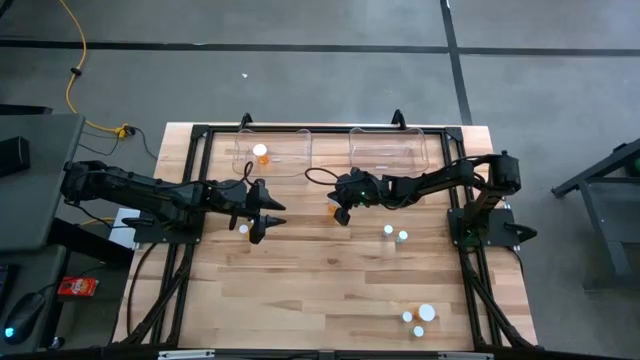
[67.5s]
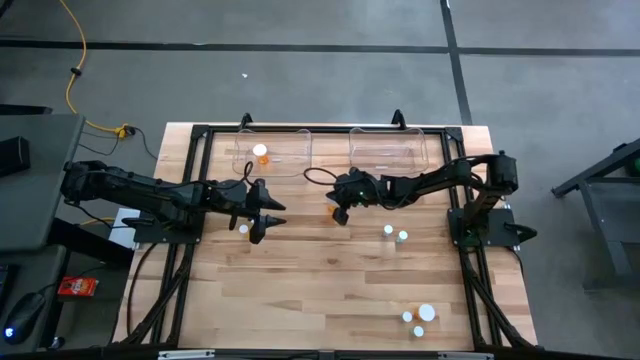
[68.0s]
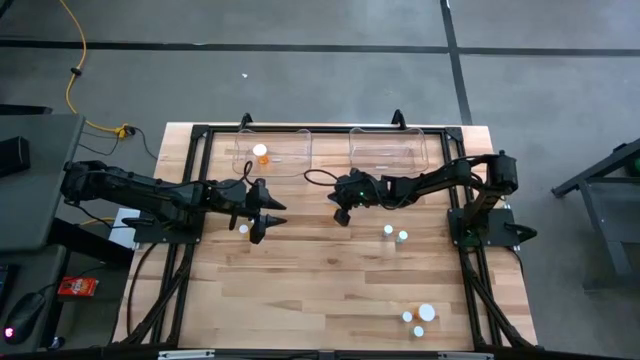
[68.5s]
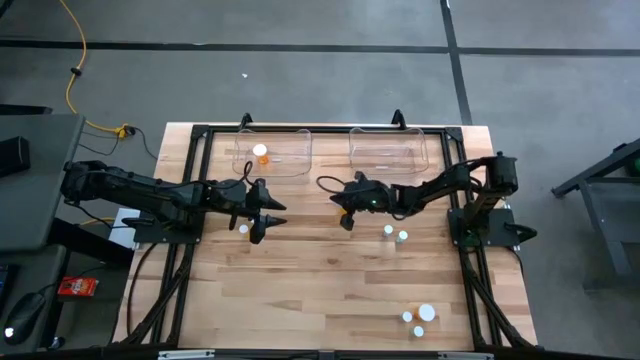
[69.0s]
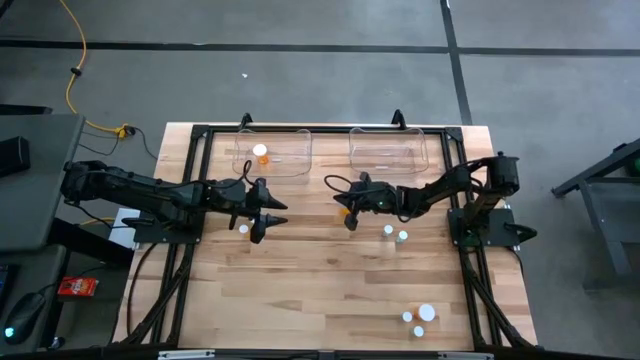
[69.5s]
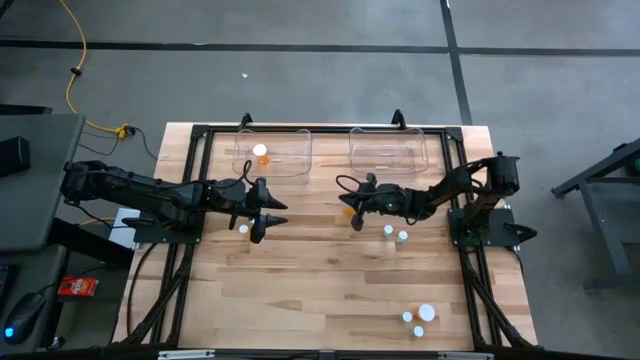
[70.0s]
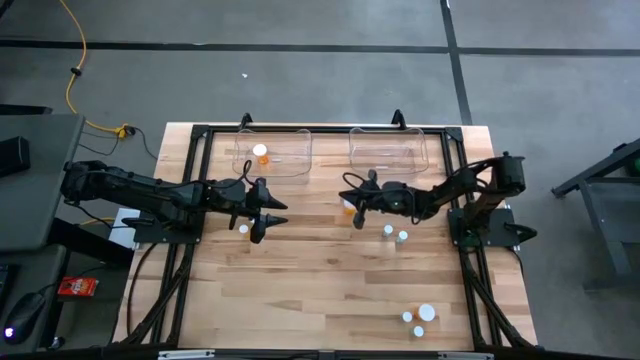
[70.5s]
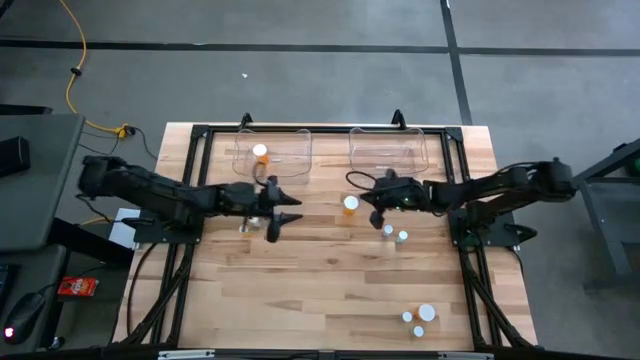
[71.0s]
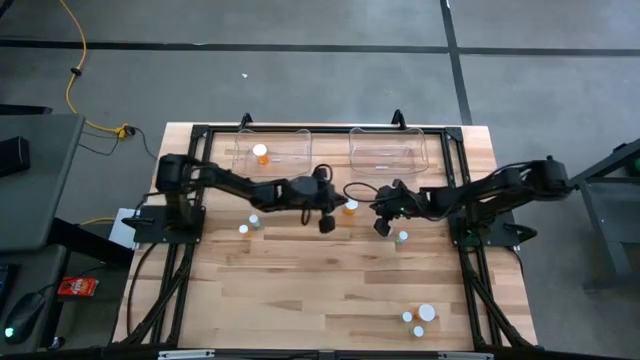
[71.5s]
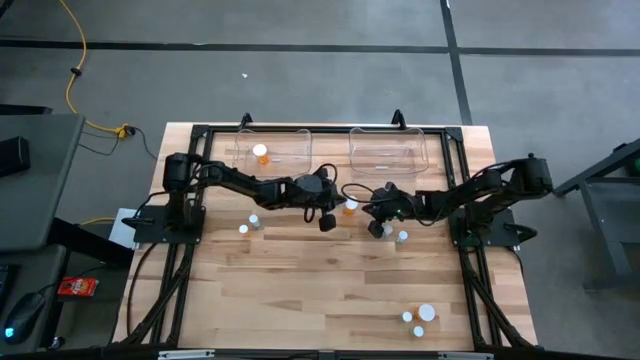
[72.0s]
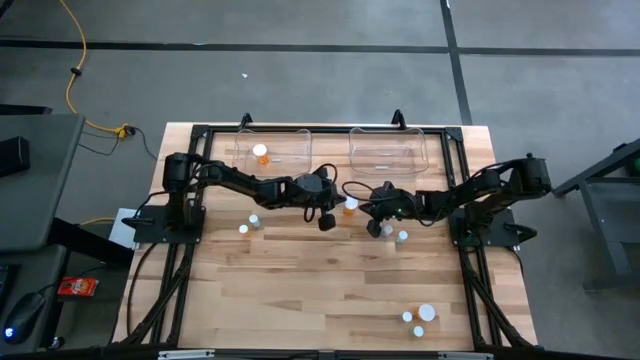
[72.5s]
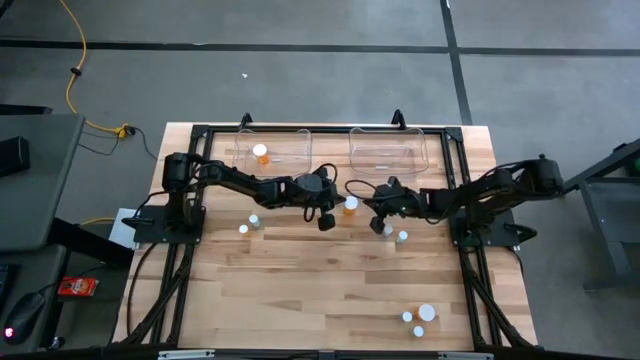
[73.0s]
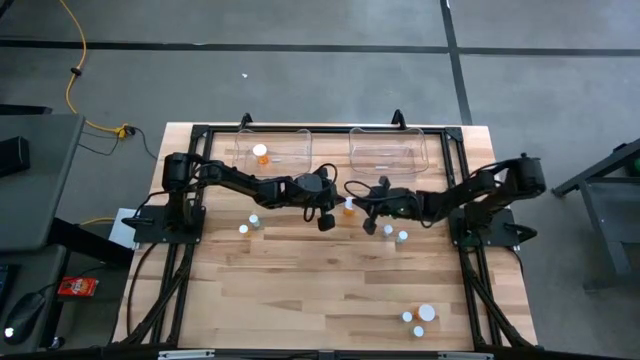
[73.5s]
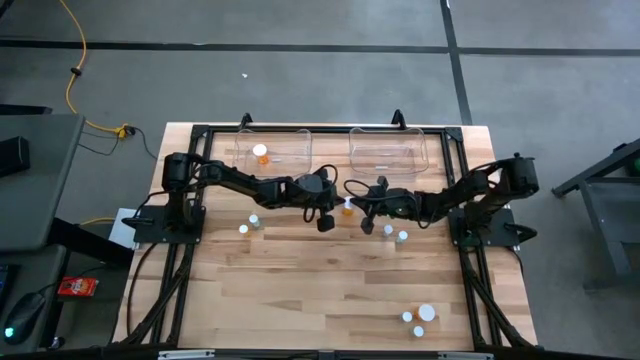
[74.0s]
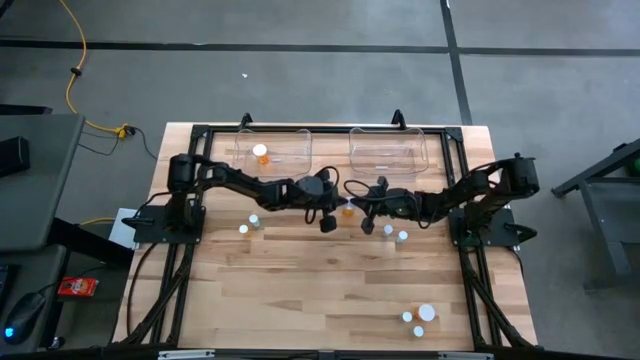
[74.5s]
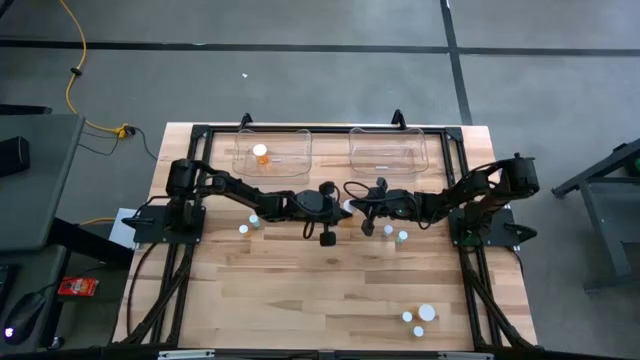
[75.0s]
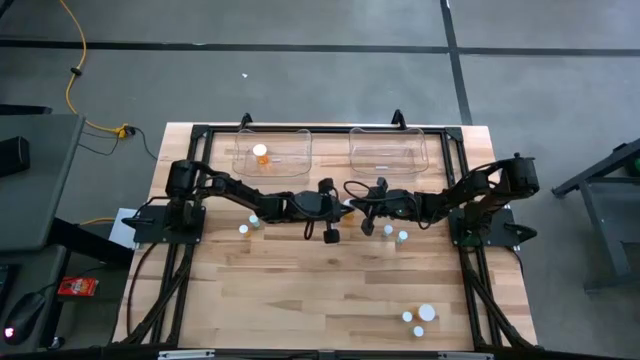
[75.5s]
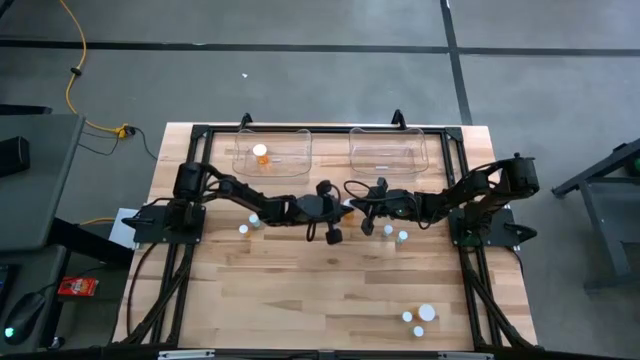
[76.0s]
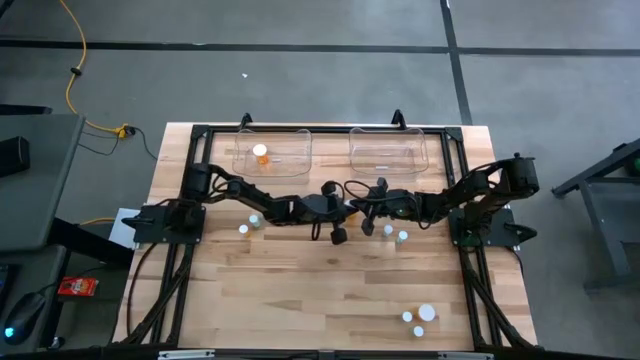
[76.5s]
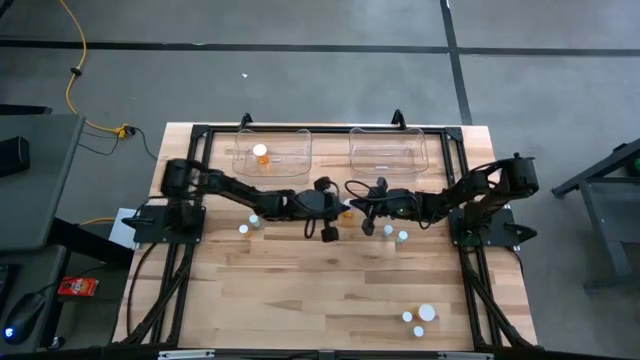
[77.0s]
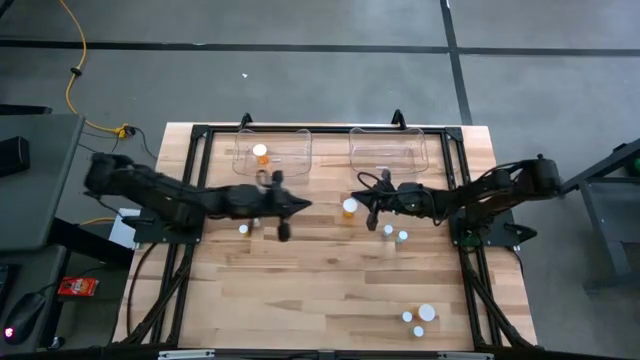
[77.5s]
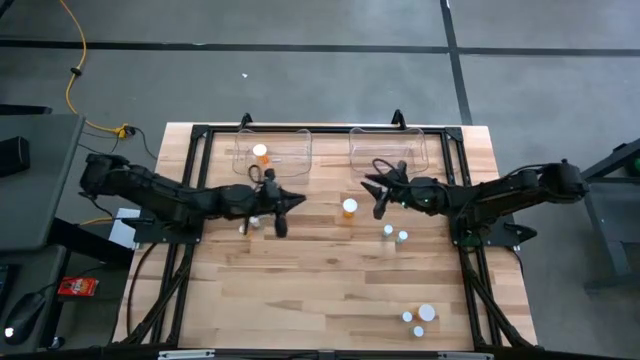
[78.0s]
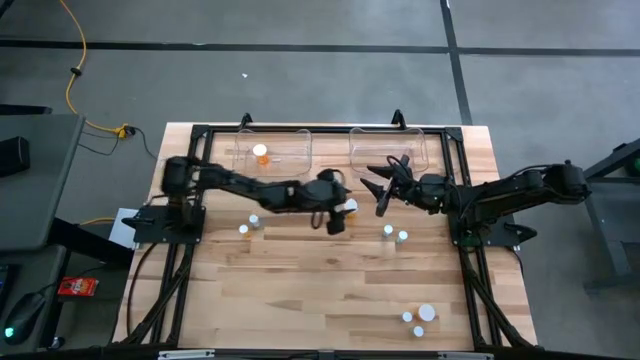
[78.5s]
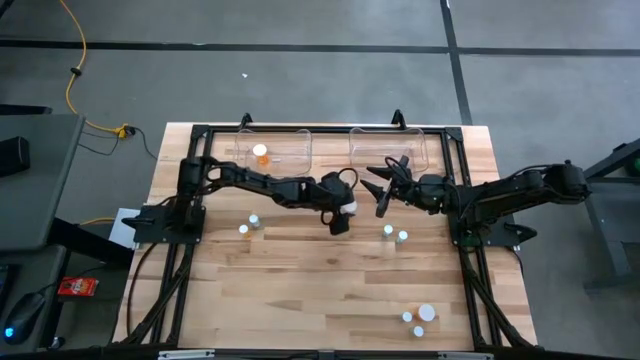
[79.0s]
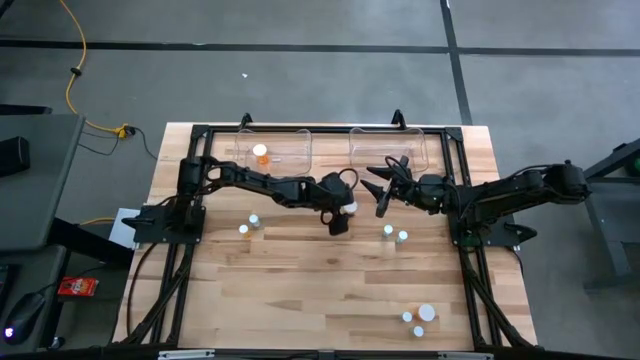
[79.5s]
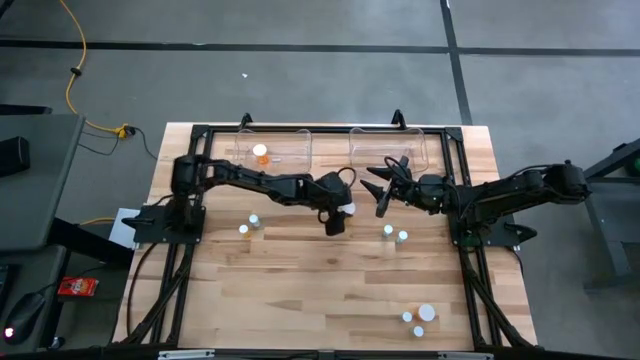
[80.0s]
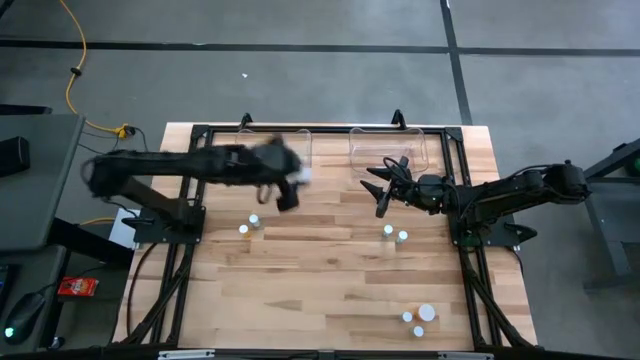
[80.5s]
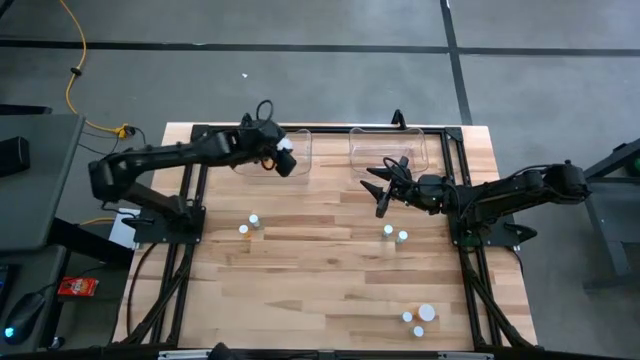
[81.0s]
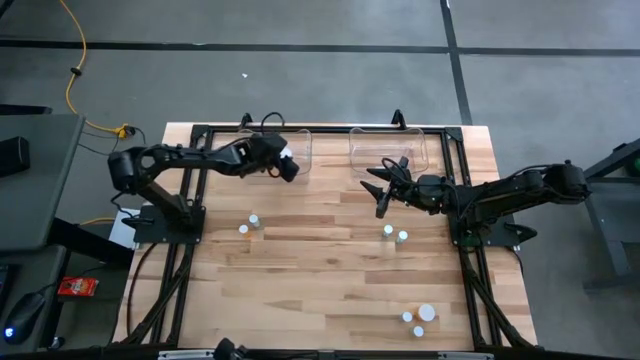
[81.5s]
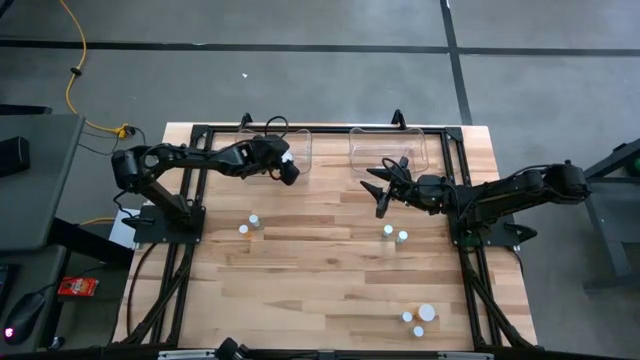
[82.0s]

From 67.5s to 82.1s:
Task: Pick and place medicine bottles into bin by pill shape (circle, oval)
Put the top orange capsule bottle into the left transparent bin

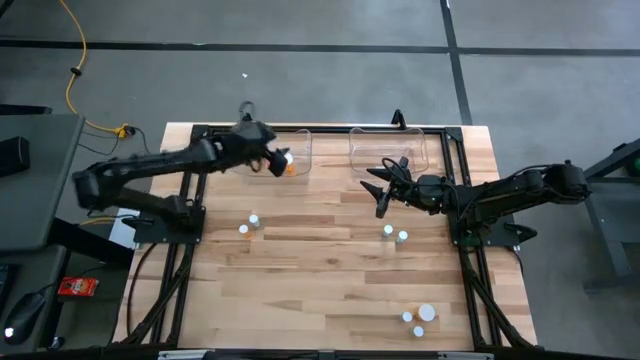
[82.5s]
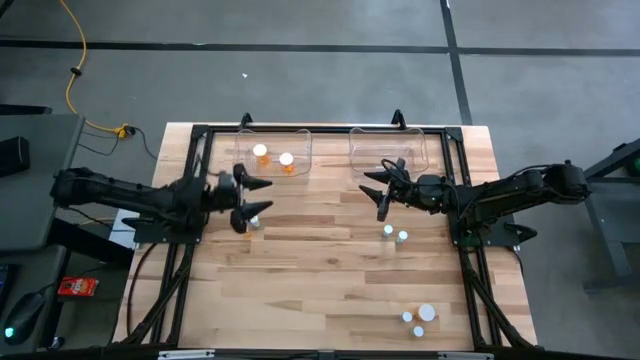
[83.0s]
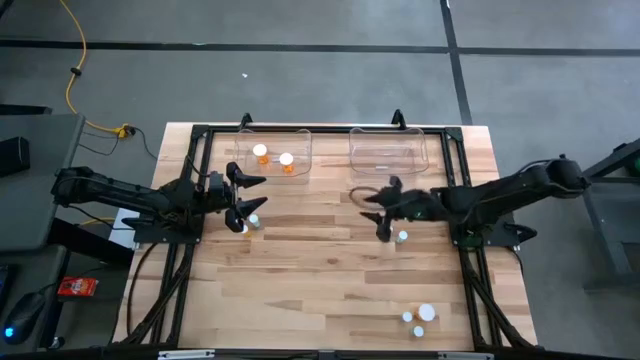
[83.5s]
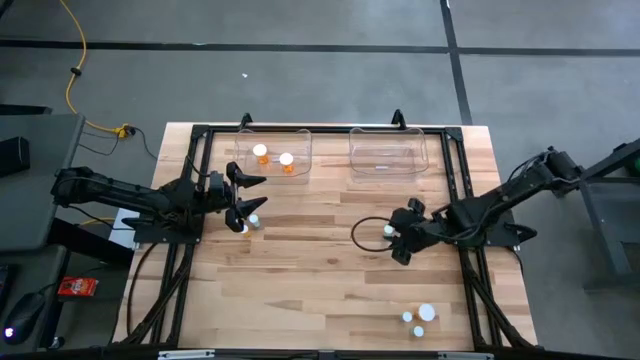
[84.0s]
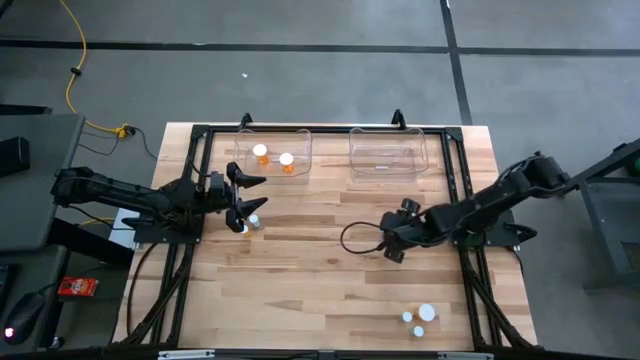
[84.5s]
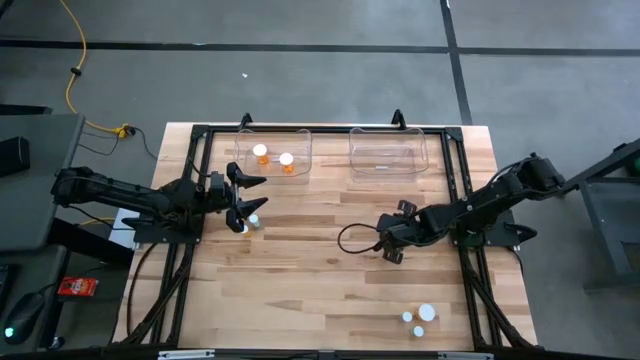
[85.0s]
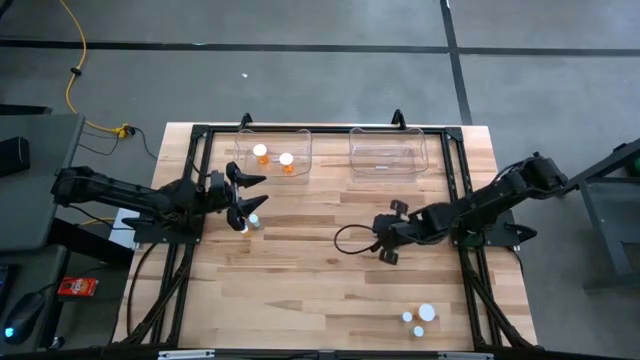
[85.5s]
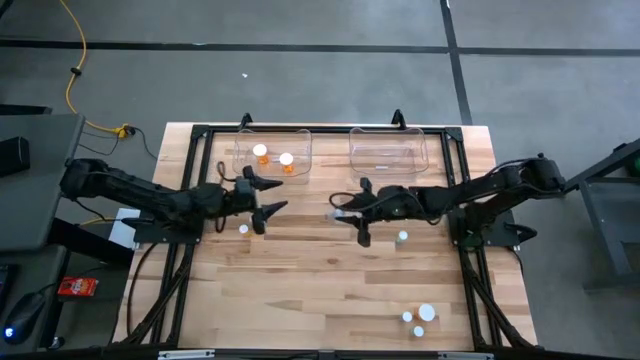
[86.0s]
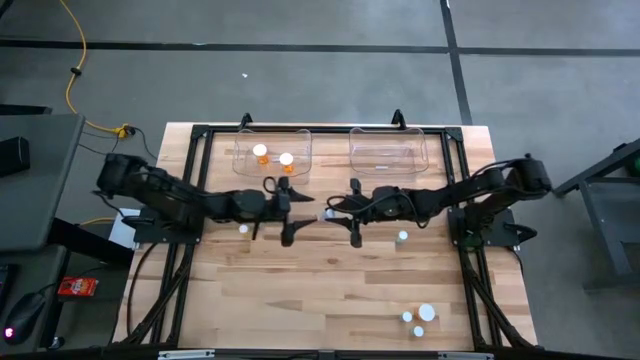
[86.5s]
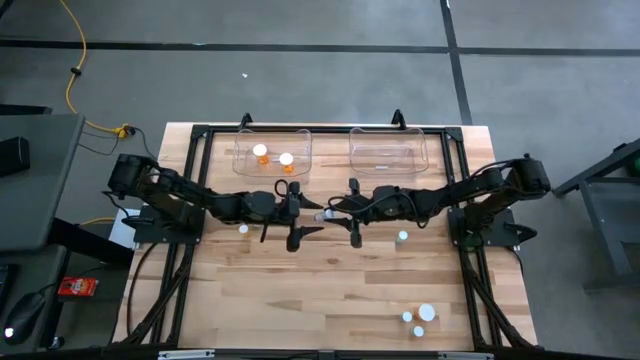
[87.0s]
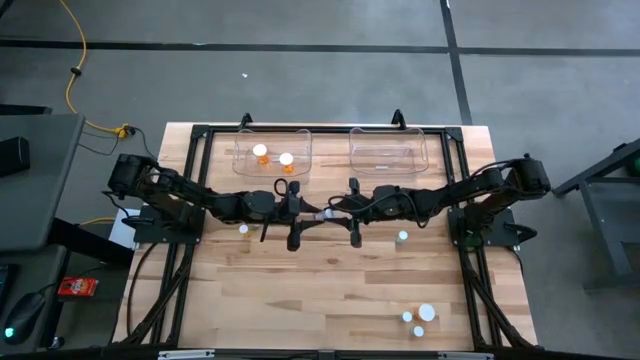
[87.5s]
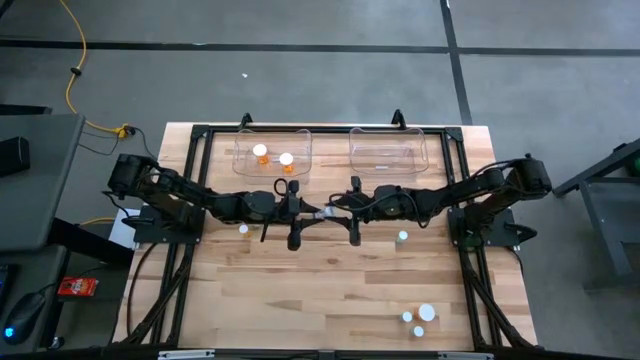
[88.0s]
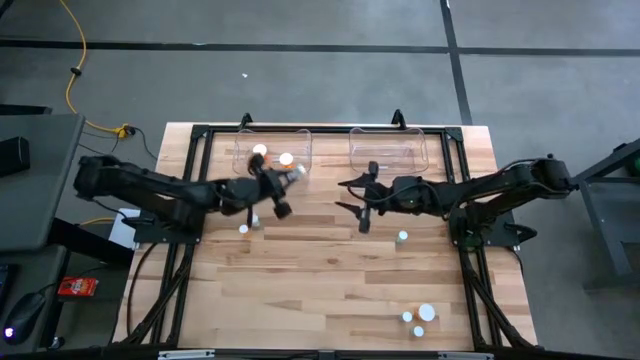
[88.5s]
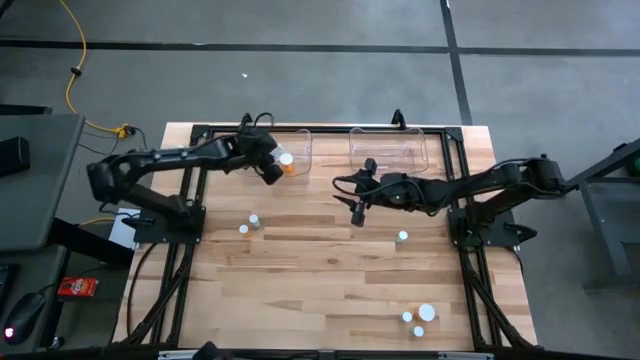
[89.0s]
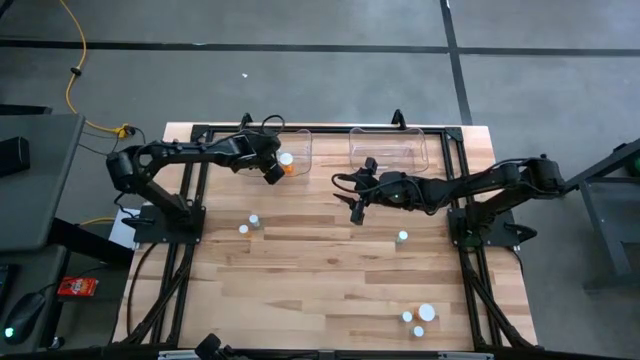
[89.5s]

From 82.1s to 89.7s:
Put the top blue capsule bottle into the left transparent bin
